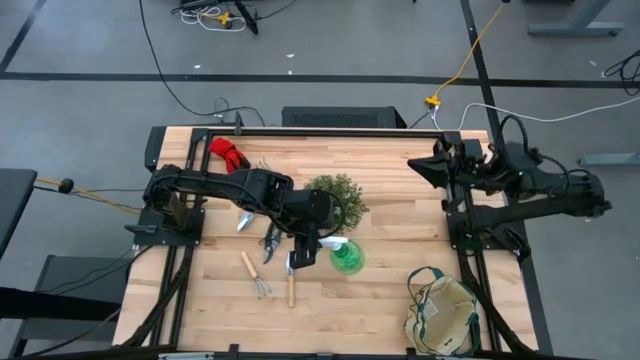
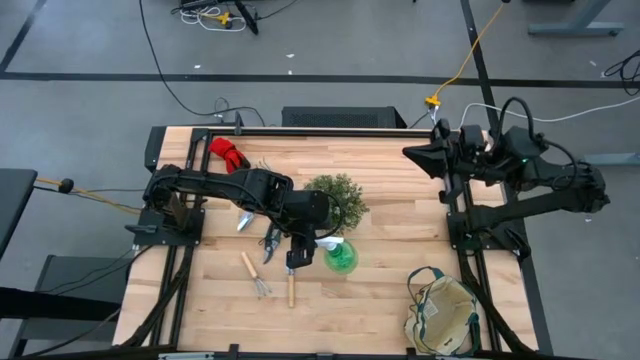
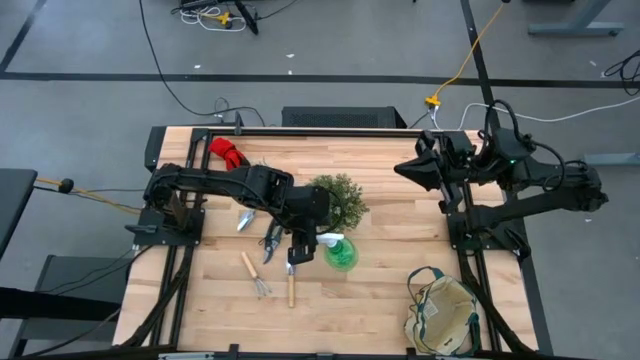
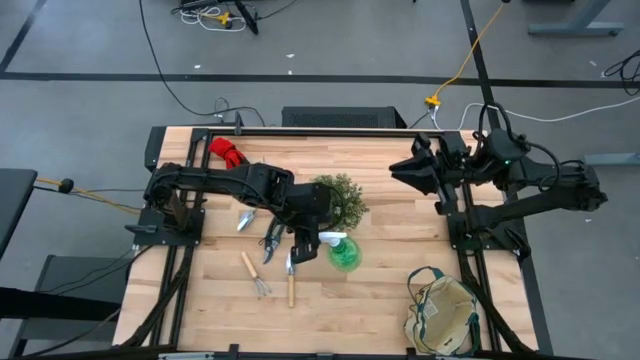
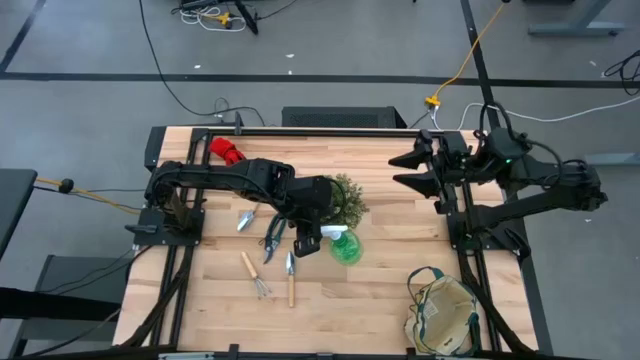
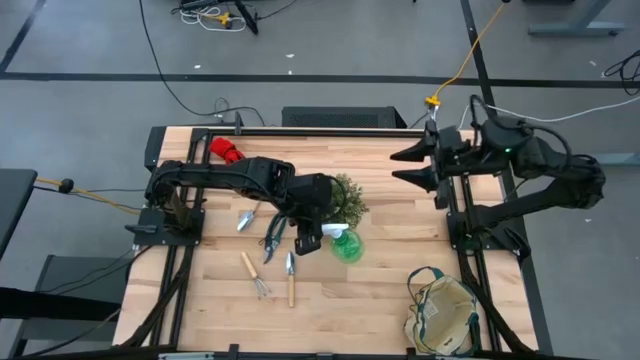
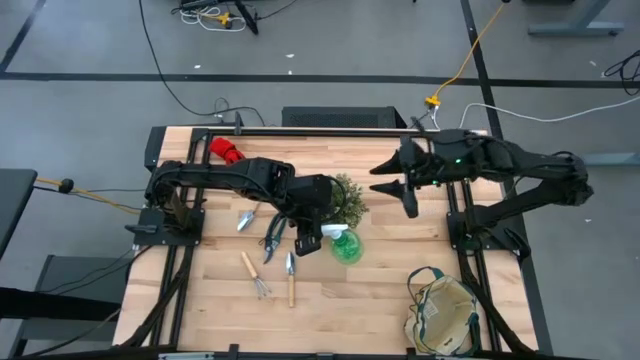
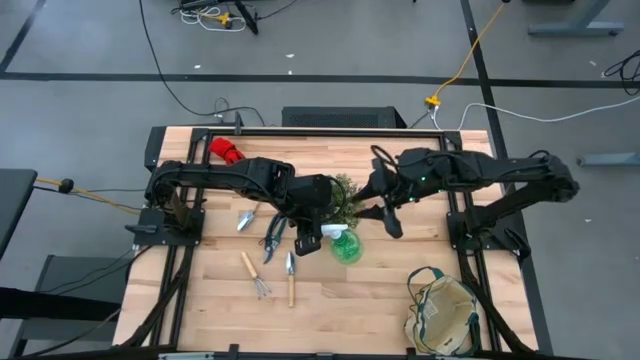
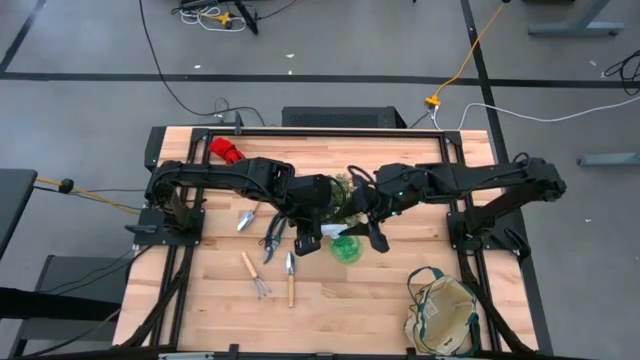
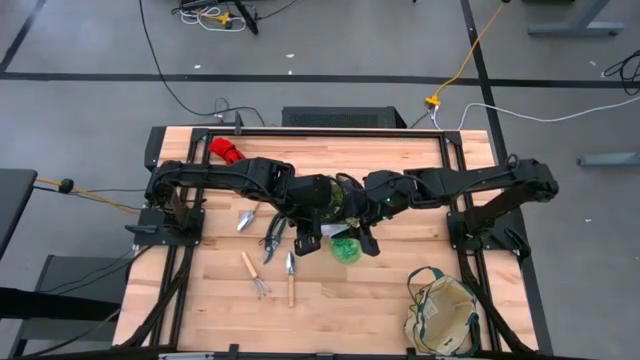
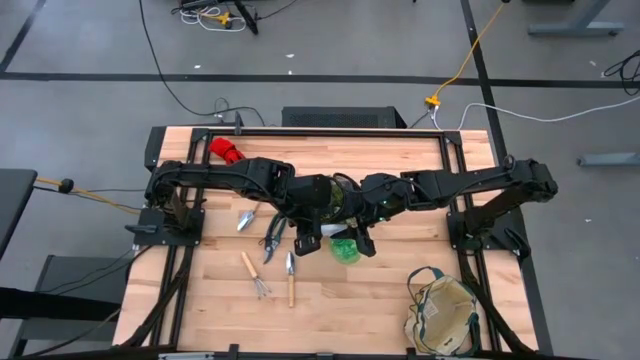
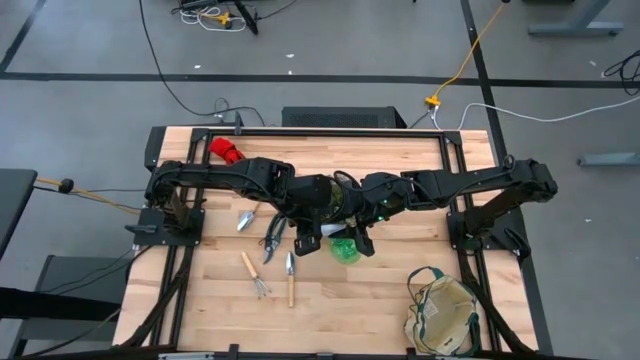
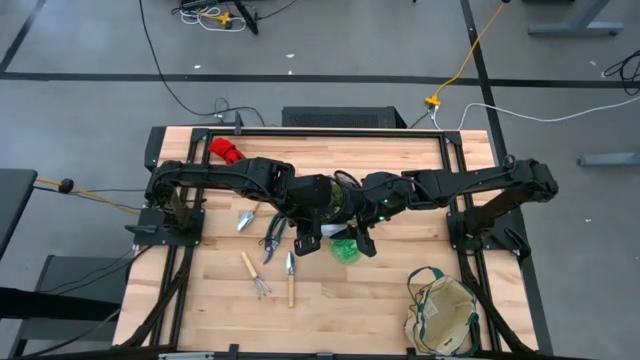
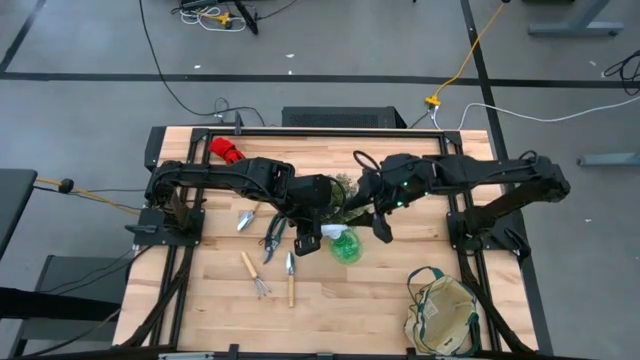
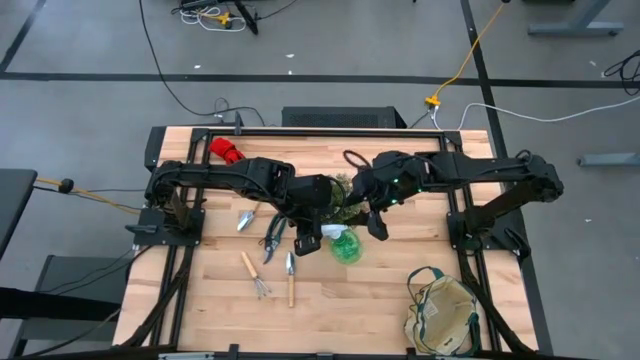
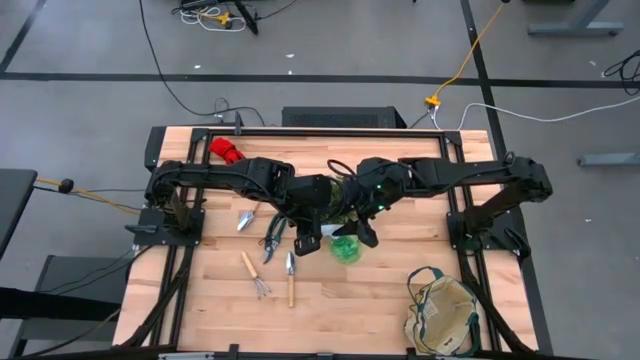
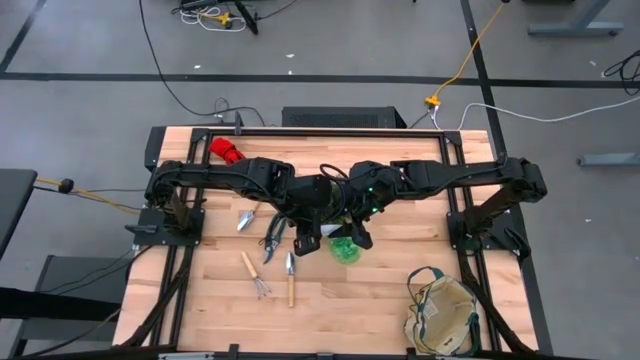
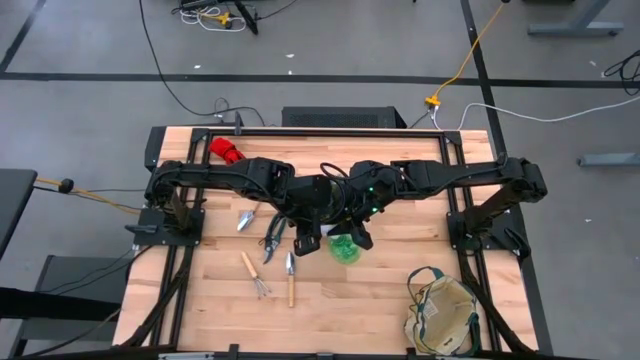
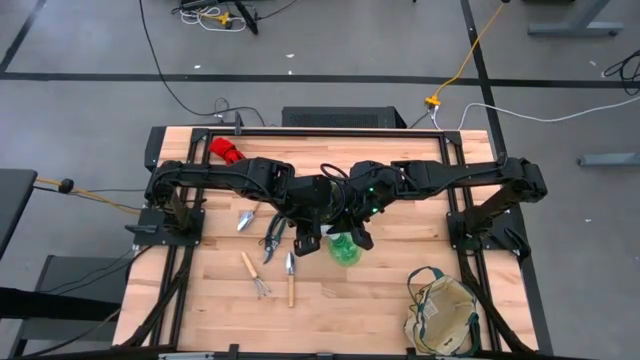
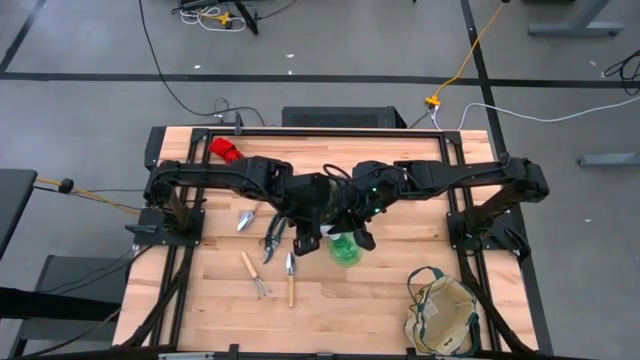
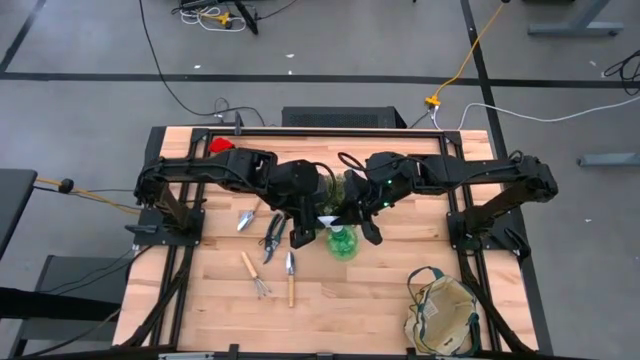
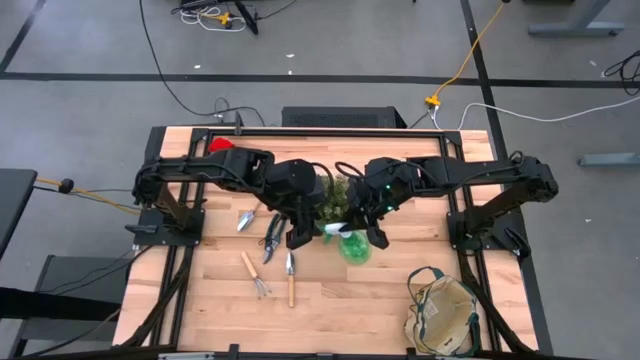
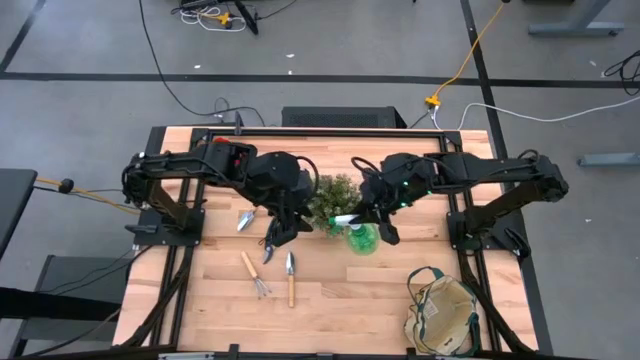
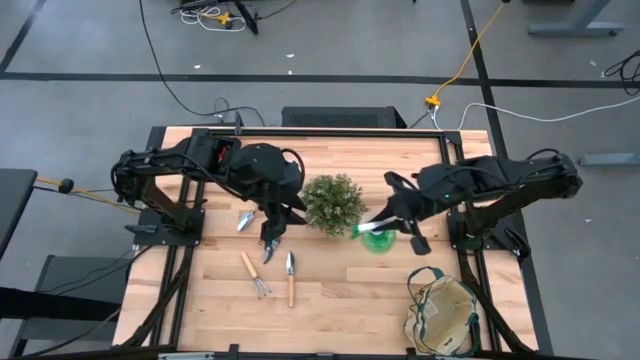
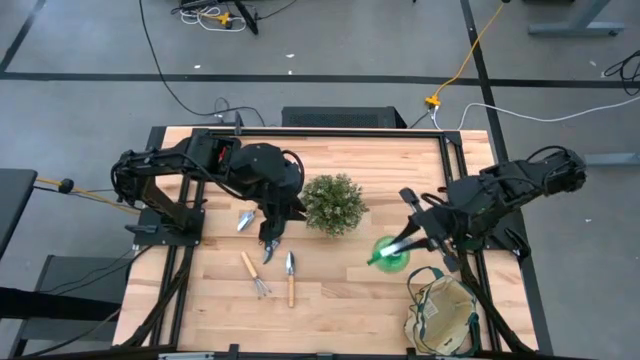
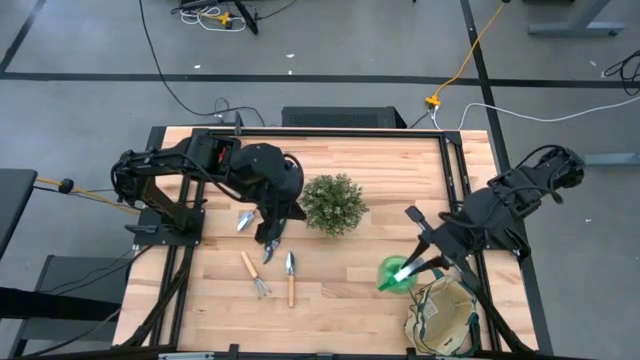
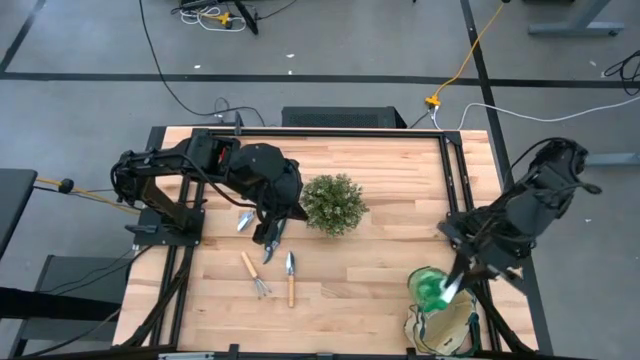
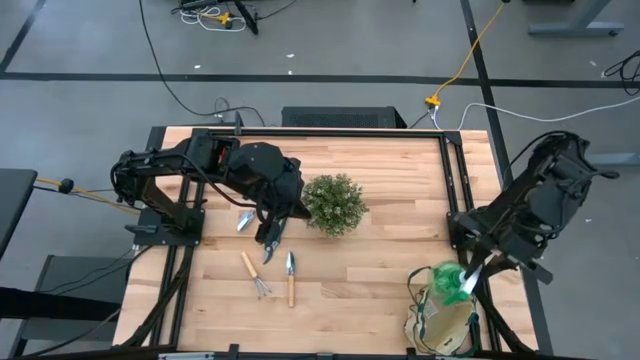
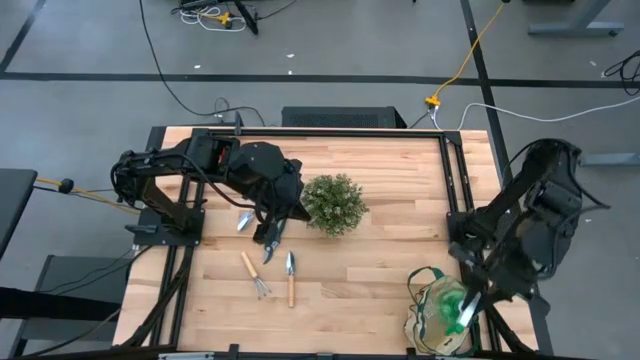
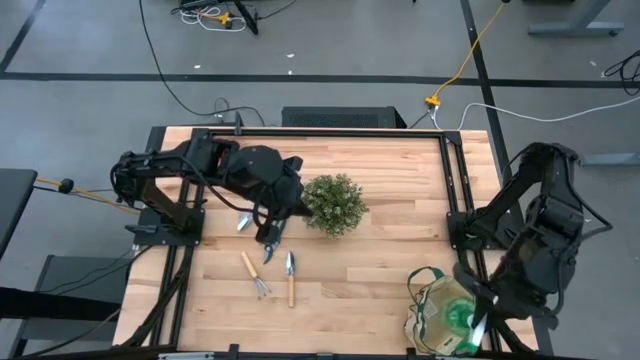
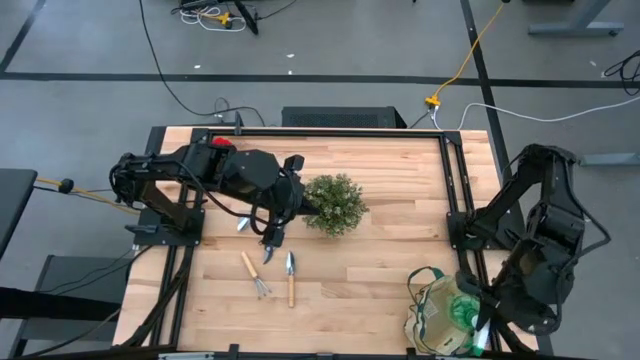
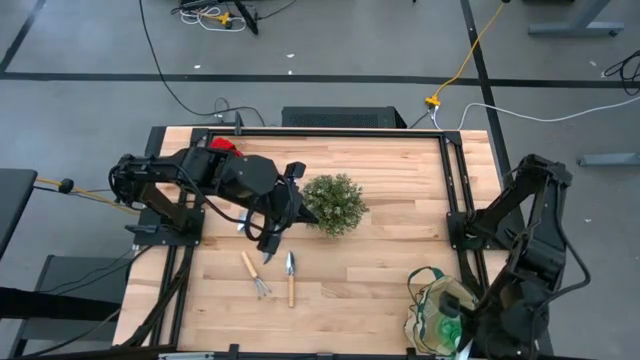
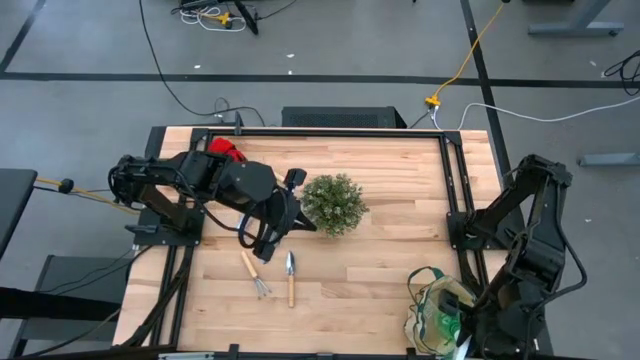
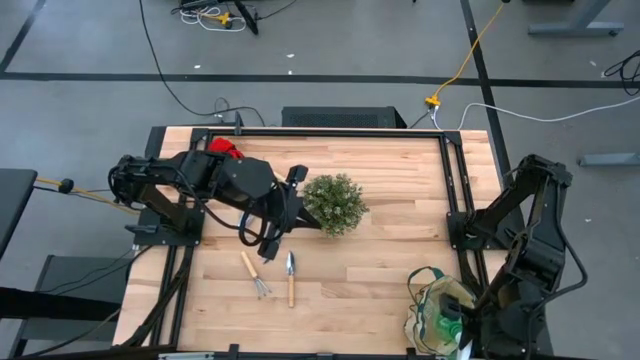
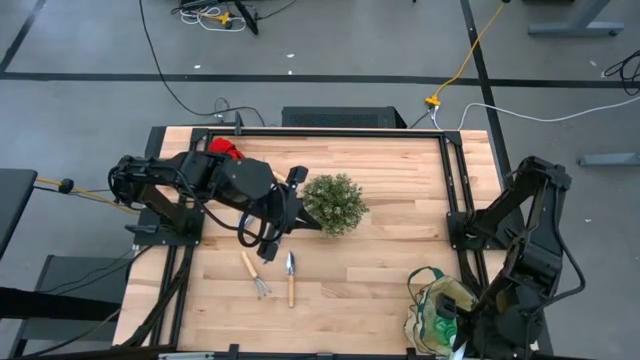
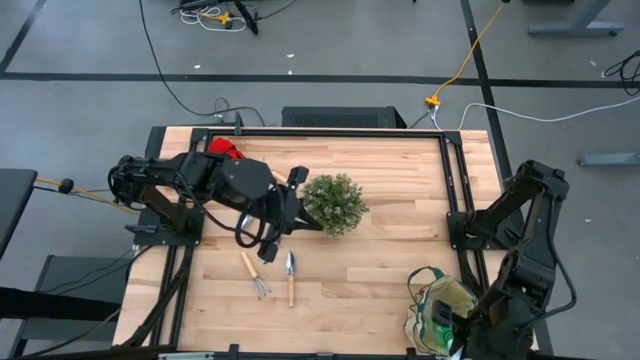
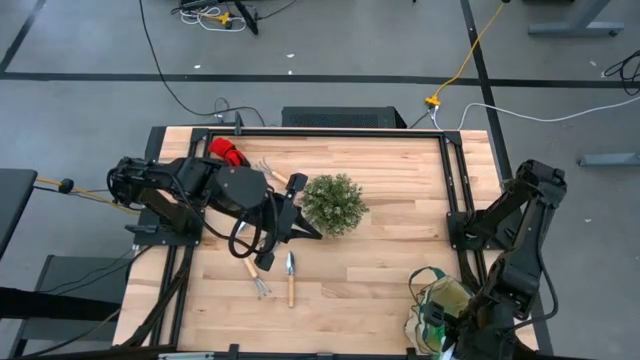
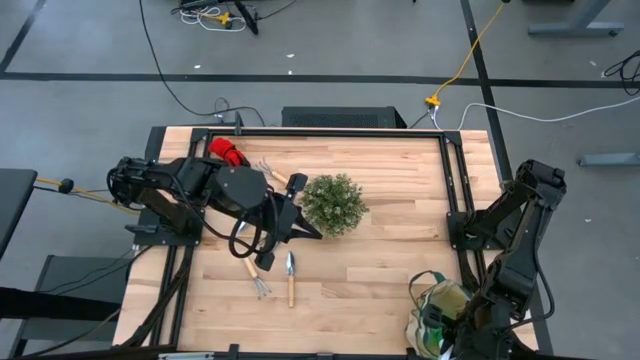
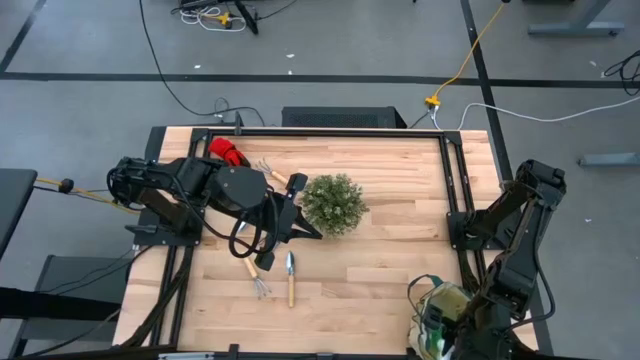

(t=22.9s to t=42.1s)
Task: Pick & Place Garden tools in Gardening bag
Put the green spray bottle into the white gardening bag

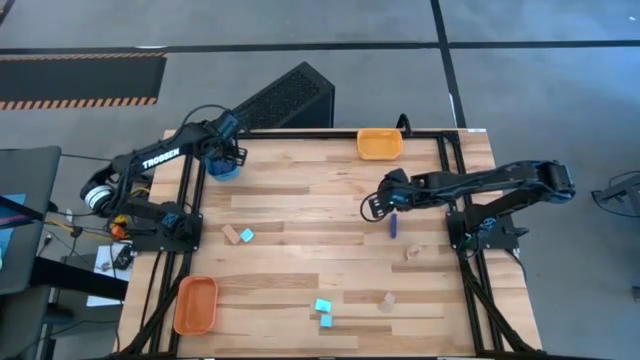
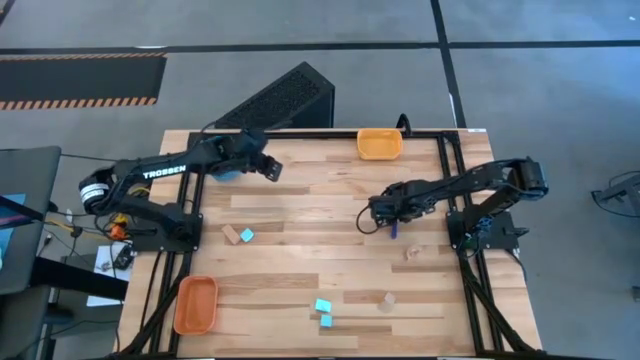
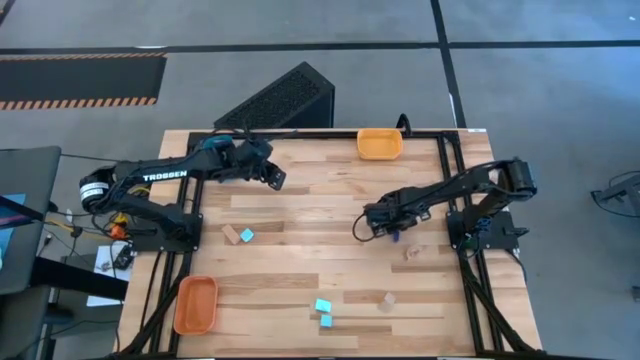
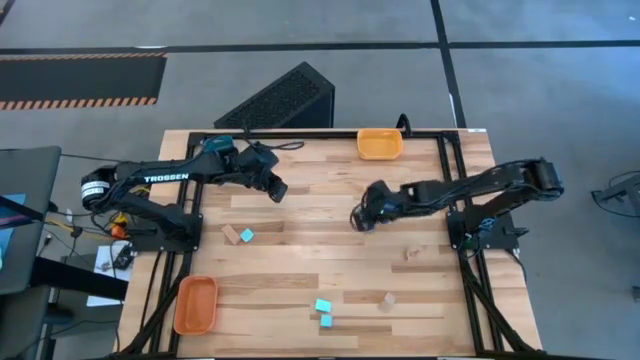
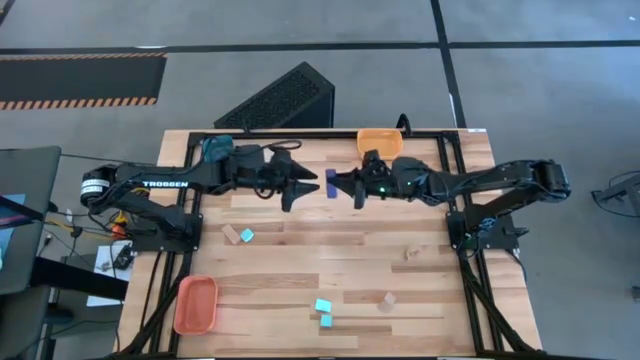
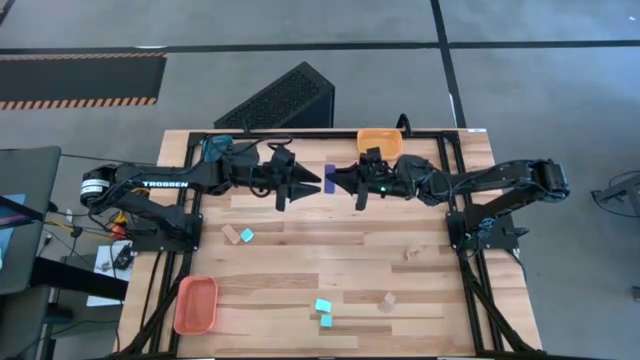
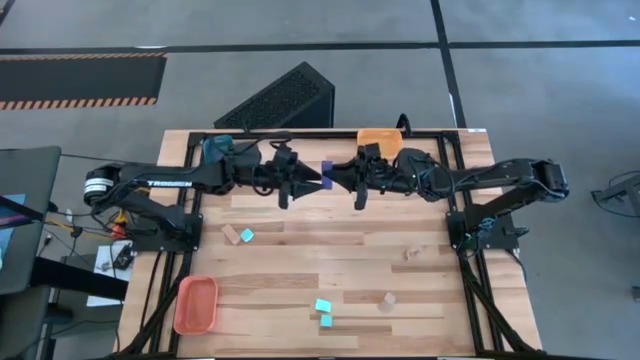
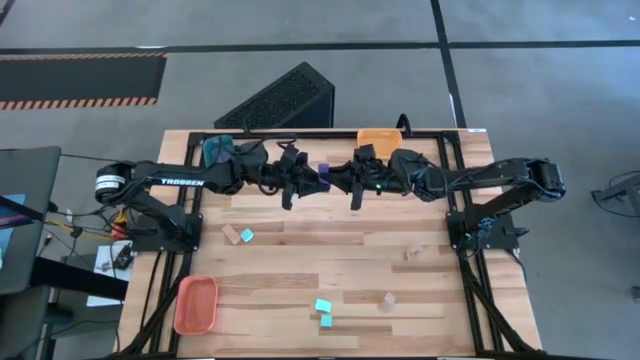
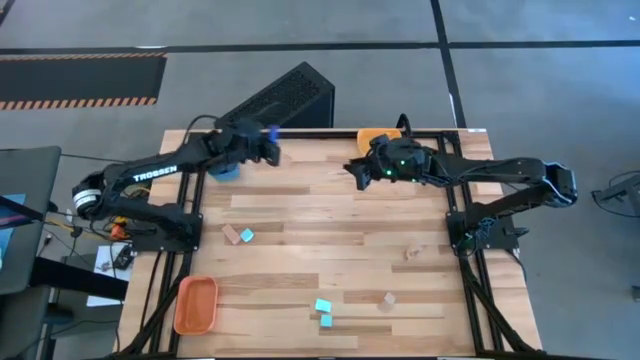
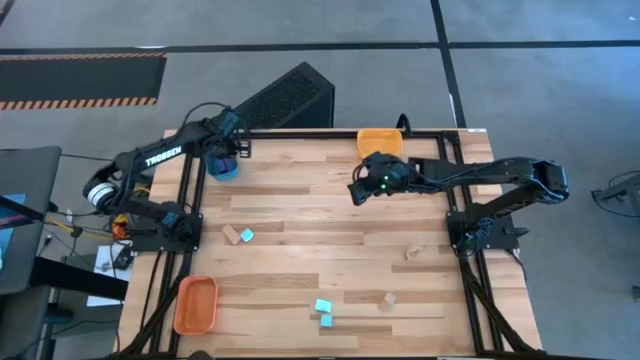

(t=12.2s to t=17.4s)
Task: Sort & place blocks by color
Put the blue block into the green bin
